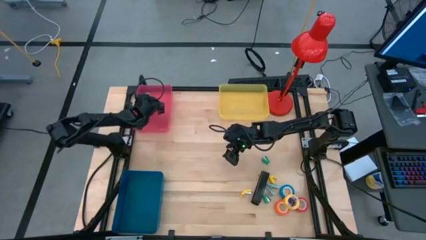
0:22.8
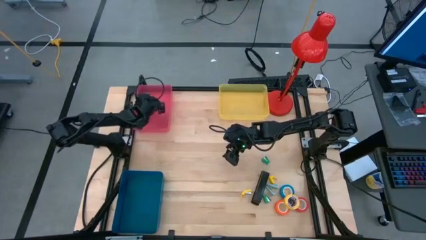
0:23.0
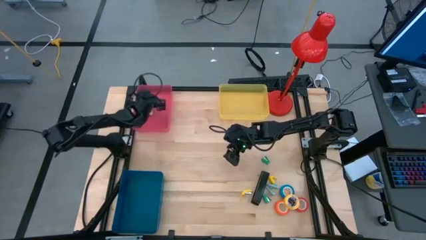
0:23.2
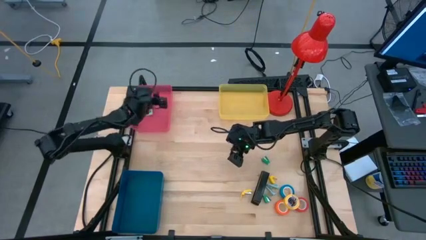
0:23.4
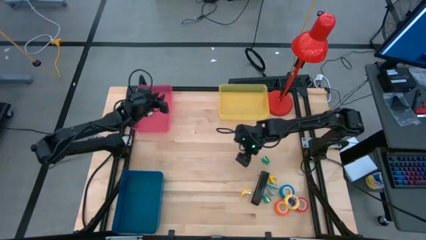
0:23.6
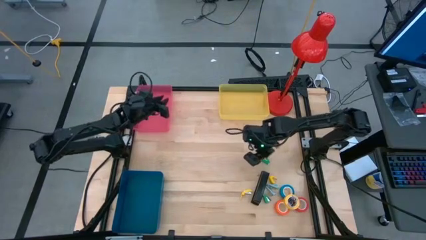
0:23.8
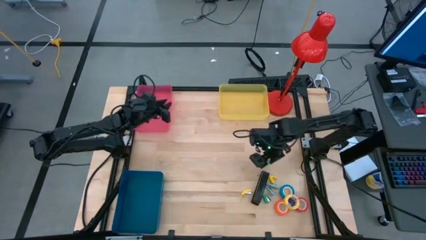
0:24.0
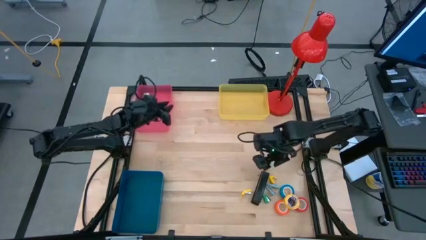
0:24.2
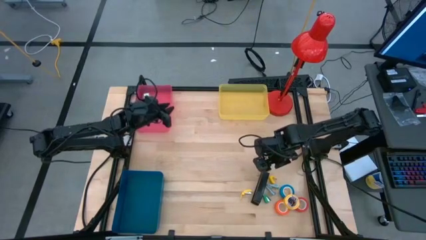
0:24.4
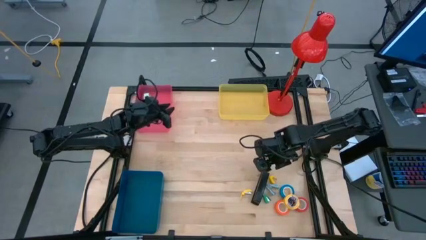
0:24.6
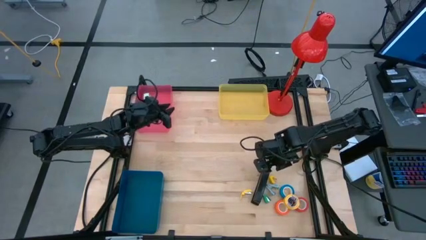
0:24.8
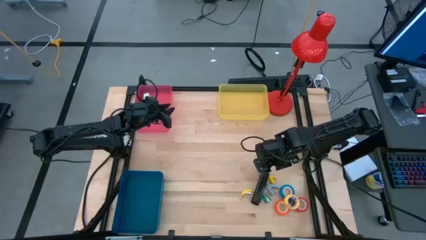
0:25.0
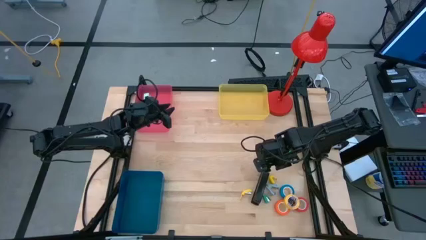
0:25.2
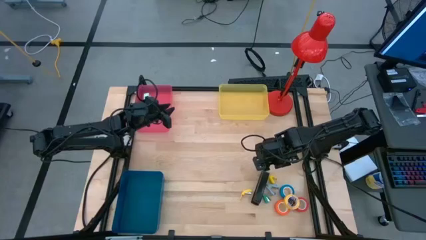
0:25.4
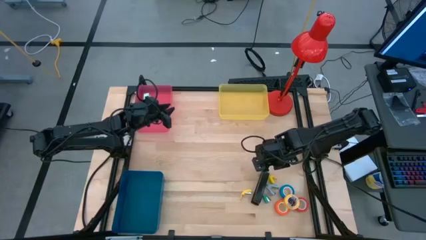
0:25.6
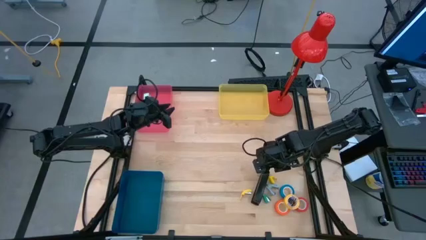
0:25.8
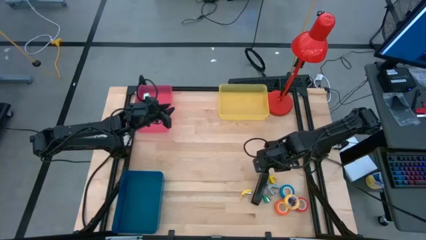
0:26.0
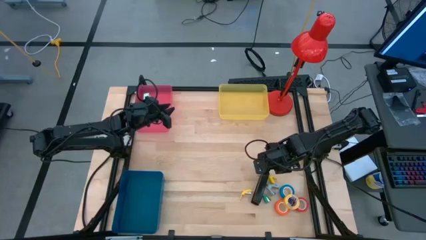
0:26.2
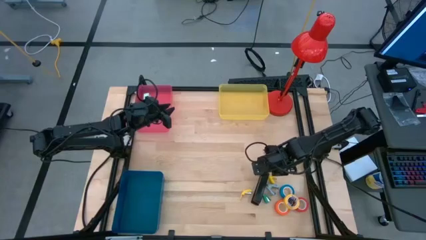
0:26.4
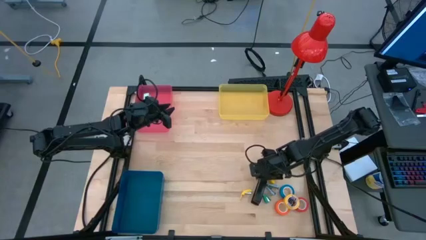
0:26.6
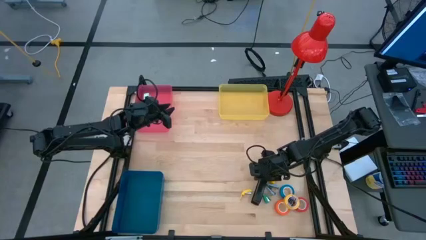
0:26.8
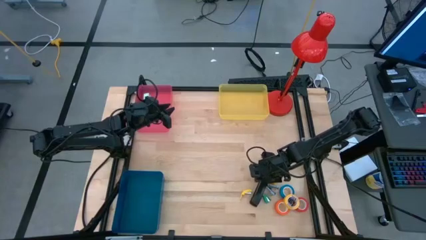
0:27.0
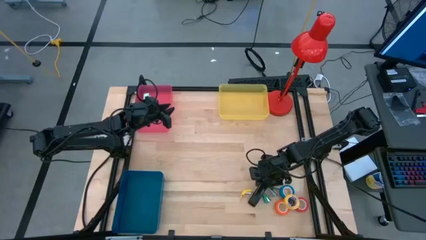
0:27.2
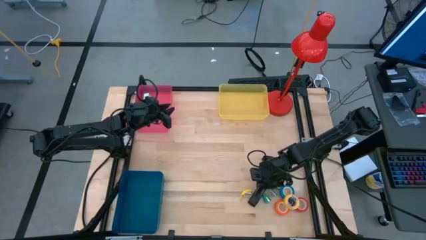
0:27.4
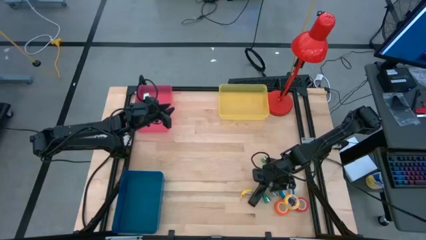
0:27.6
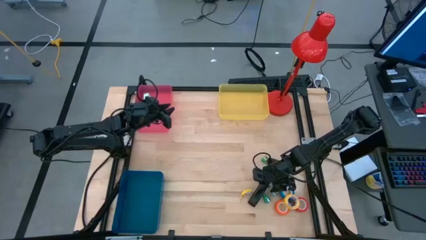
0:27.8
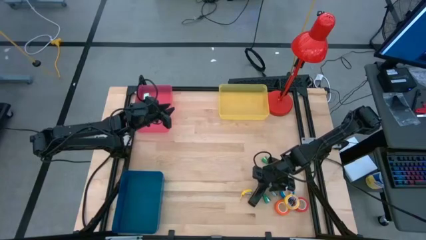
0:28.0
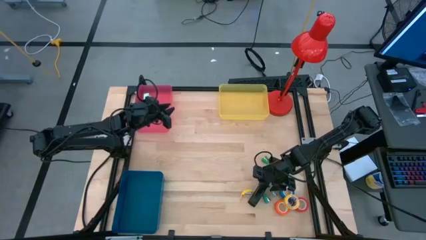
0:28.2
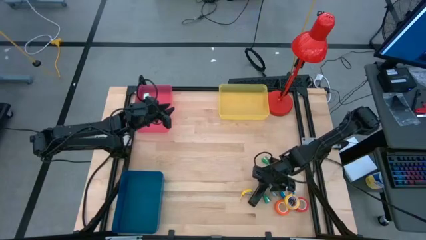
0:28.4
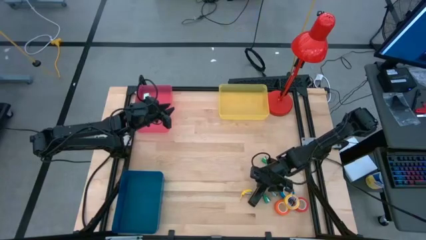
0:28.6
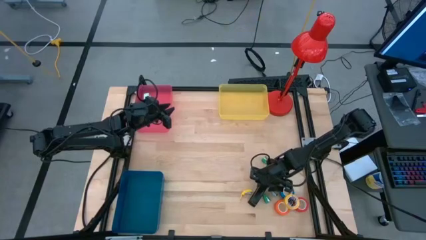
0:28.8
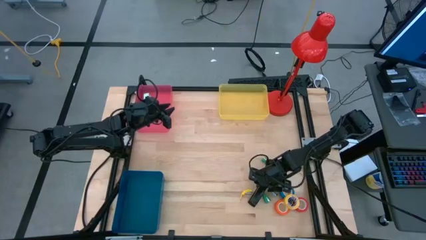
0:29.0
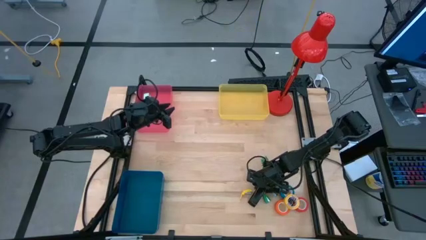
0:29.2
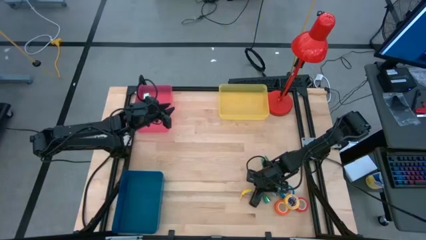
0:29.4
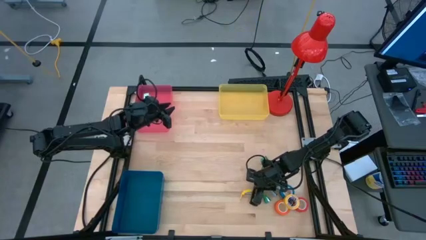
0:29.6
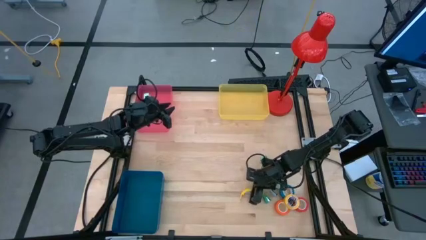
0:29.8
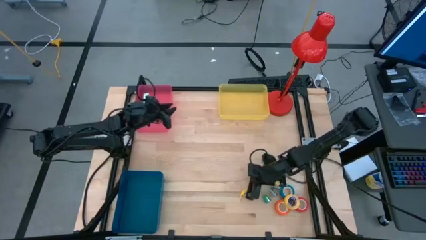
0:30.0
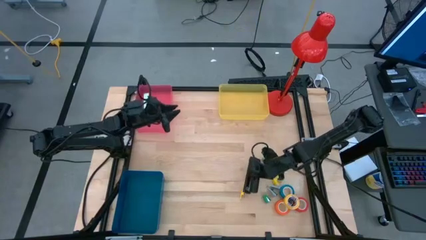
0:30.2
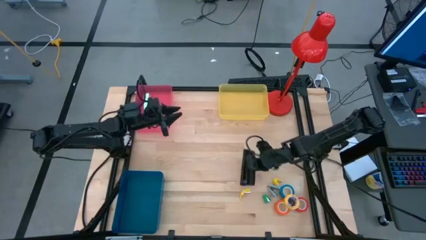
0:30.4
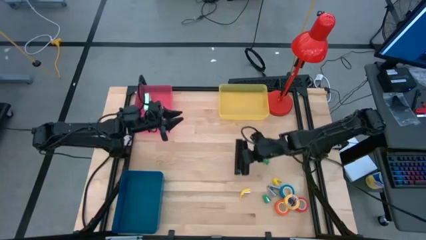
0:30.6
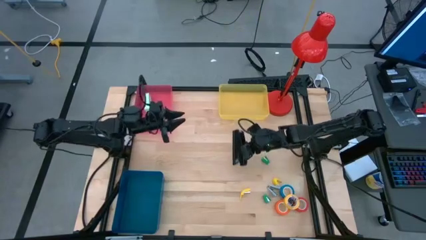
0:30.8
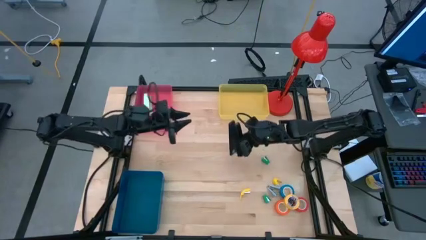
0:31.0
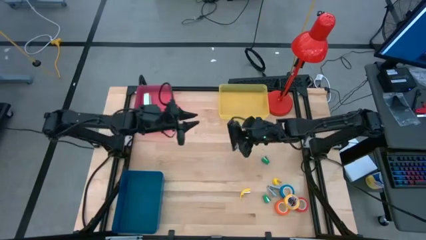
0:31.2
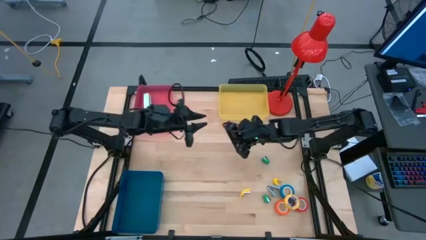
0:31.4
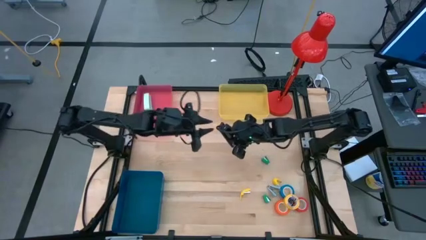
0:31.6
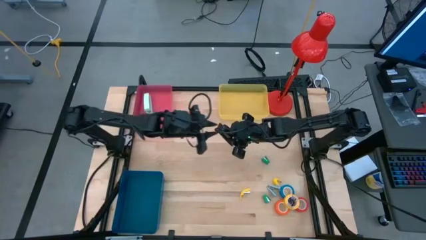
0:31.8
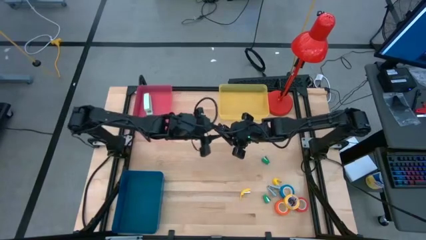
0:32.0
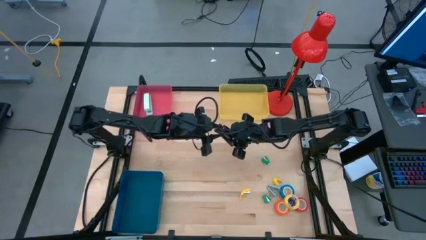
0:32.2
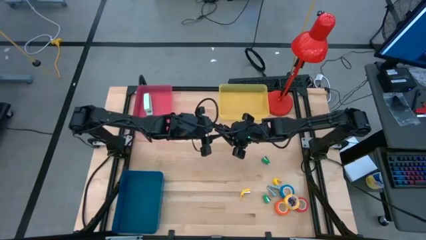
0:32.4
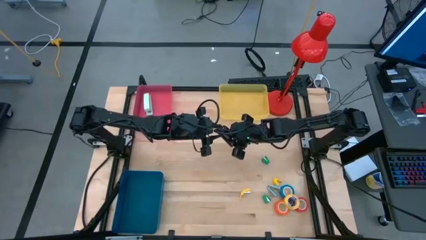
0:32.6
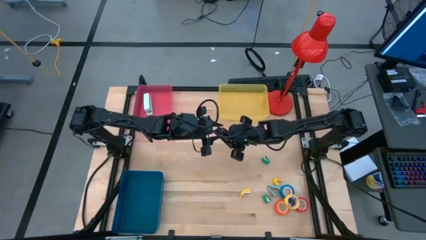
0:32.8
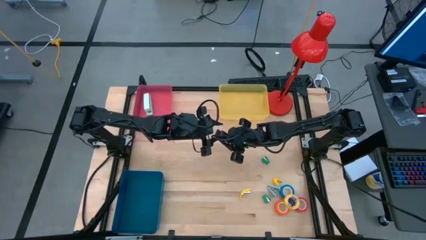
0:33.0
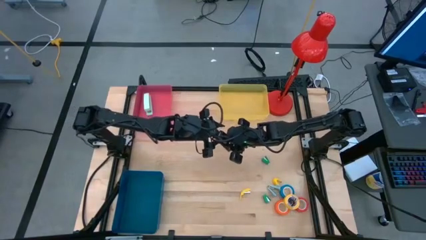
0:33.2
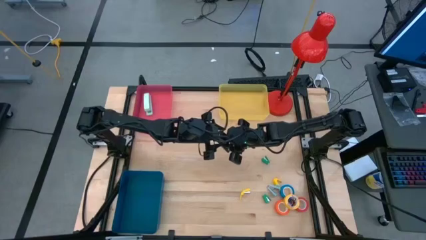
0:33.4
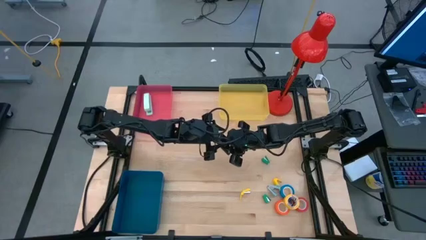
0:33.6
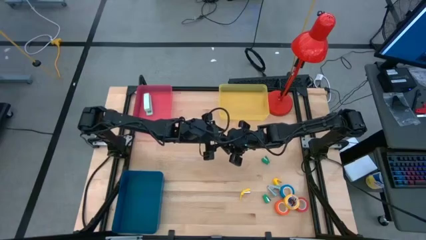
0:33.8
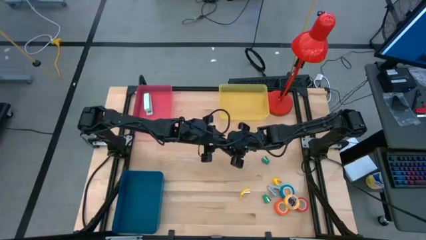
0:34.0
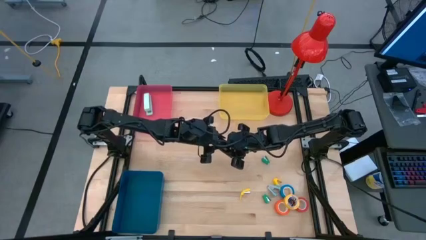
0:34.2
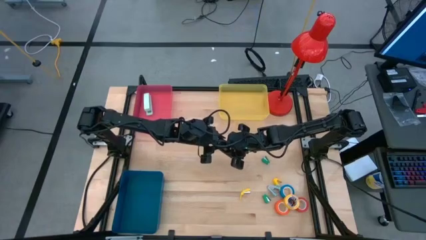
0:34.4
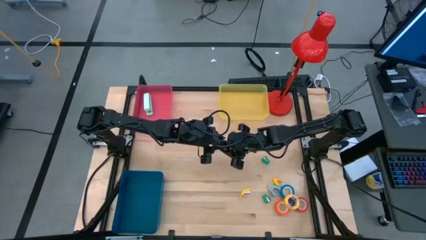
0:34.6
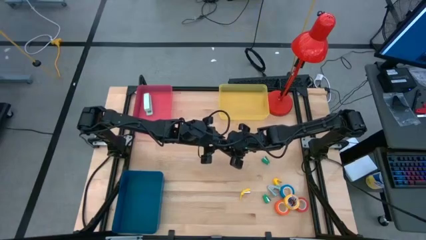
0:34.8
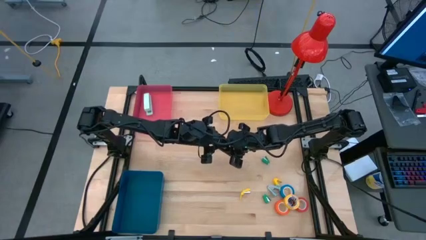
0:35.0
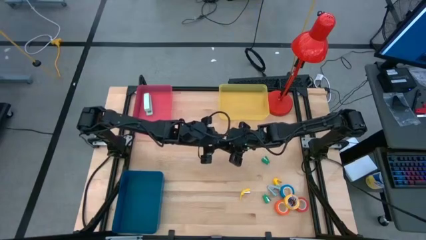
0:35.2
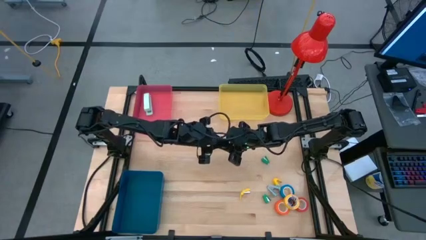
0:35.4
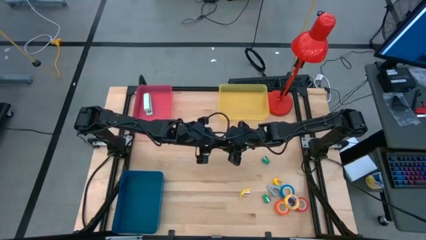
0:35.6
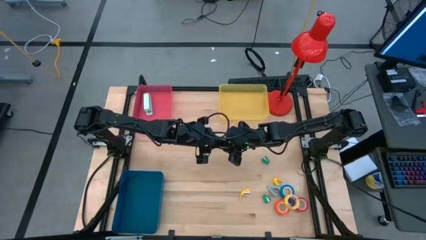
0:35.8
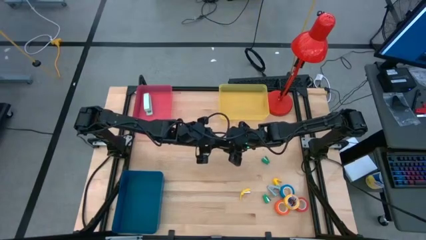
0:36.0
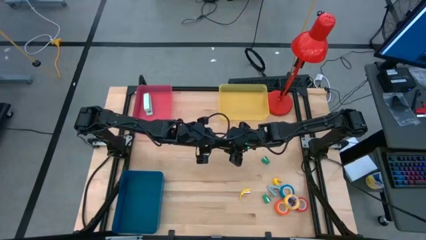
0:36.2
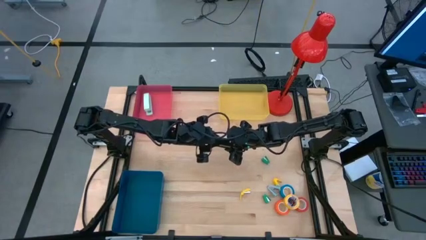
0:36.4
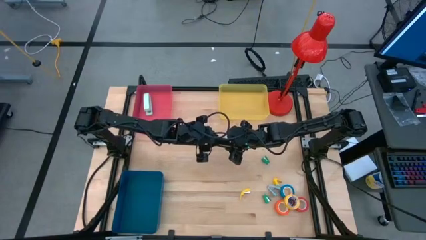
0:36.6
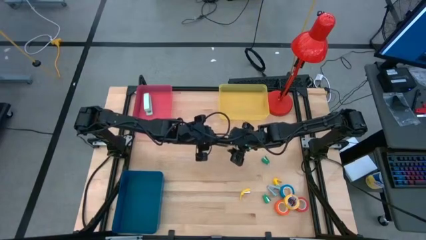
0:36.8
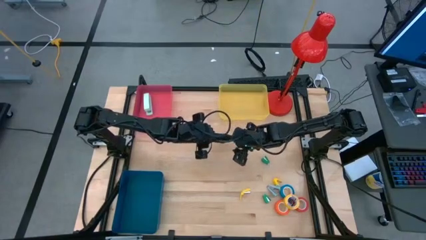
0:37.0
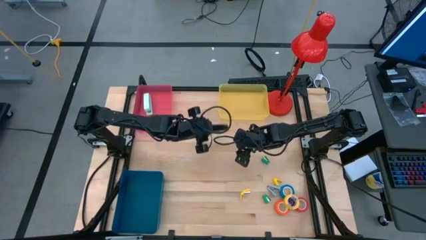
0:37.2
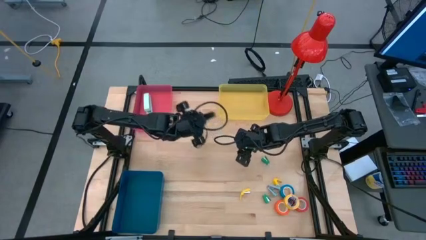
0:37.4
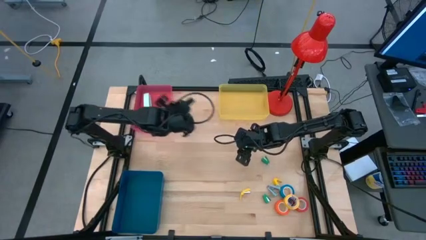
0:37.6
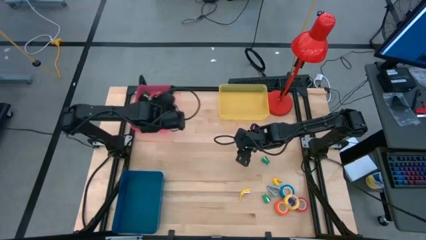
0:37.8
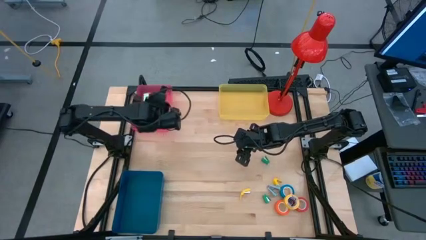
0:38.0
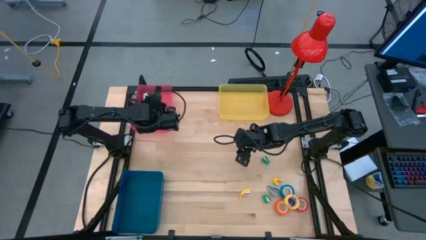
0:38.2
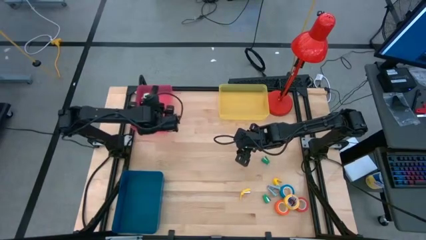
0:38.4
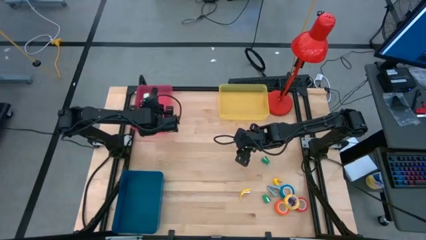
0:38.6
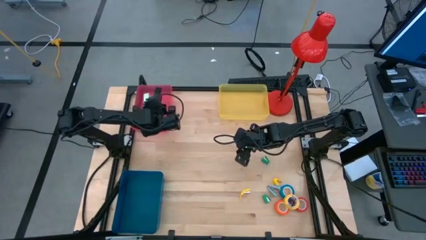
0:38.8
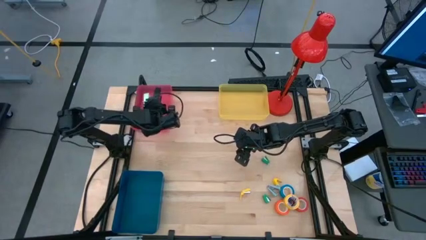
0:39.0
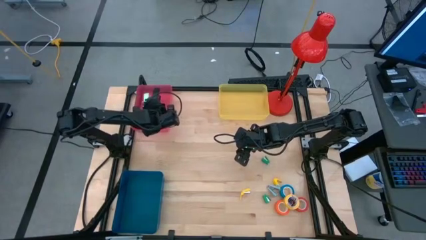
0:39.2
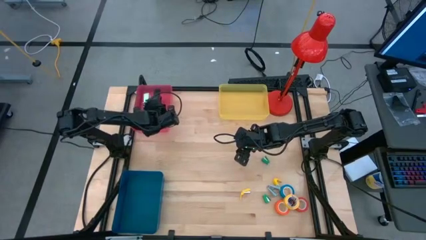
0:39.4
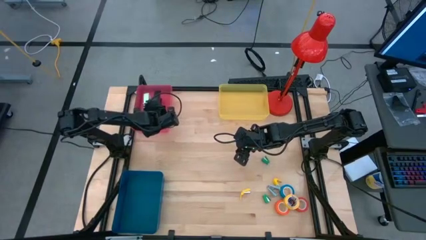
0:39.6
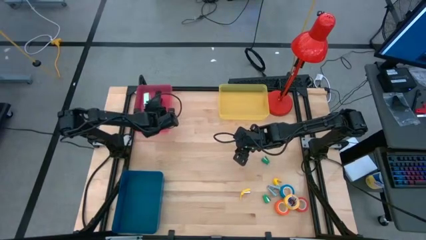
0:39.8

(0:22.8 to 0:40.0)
Task: Pick and place Stapler, Stapler remover, tape
Put the black stapler into the red bin
